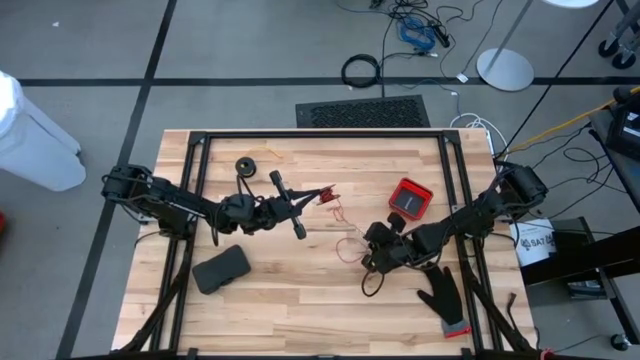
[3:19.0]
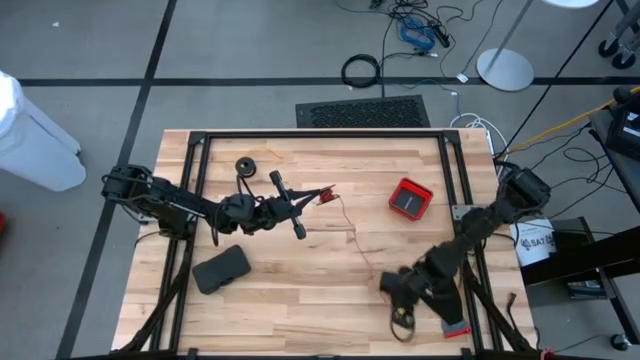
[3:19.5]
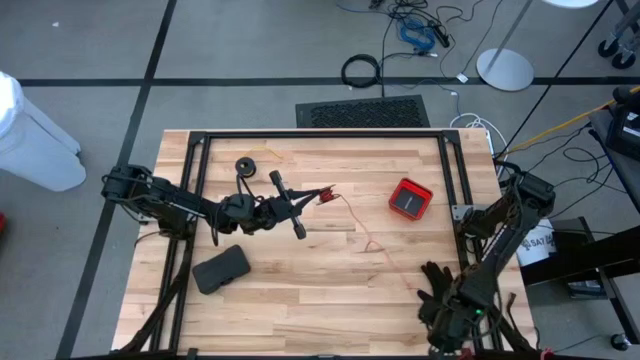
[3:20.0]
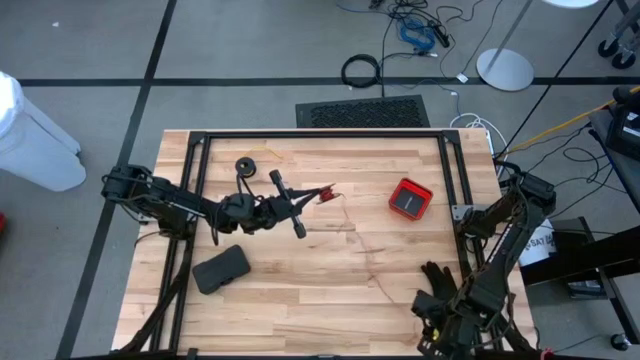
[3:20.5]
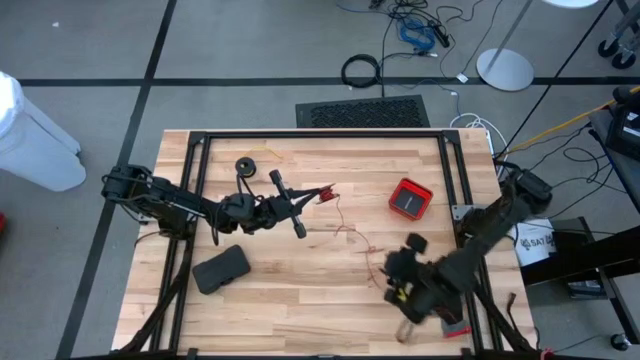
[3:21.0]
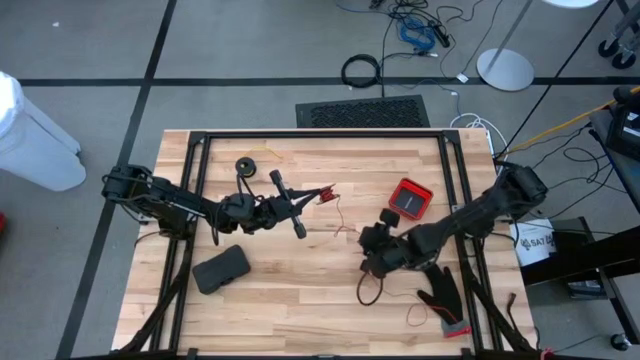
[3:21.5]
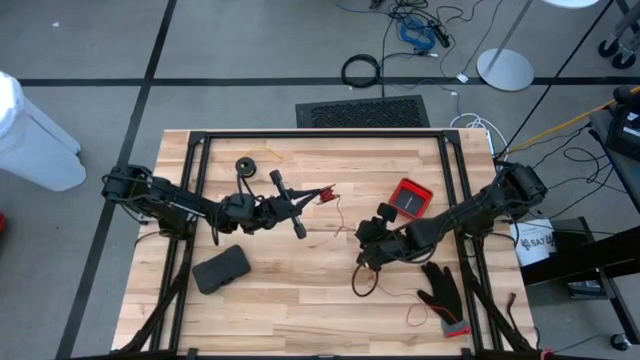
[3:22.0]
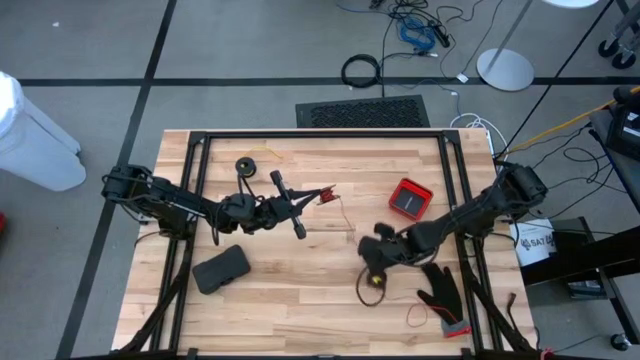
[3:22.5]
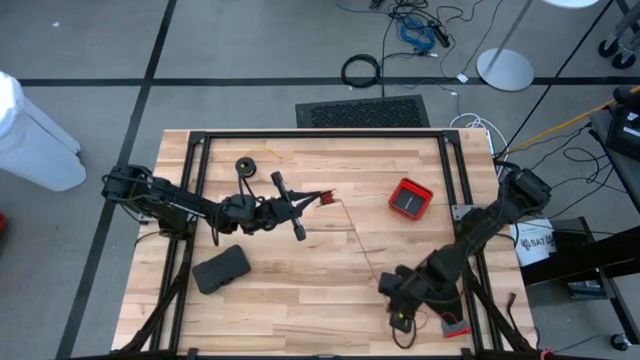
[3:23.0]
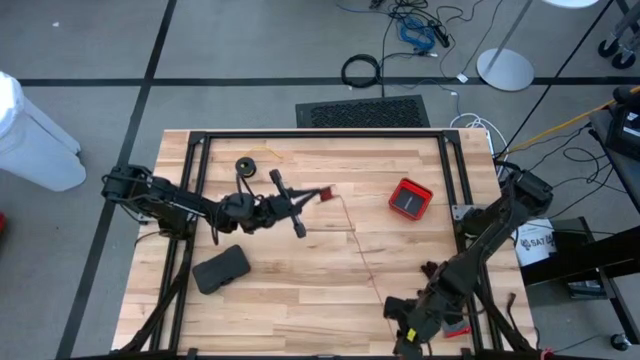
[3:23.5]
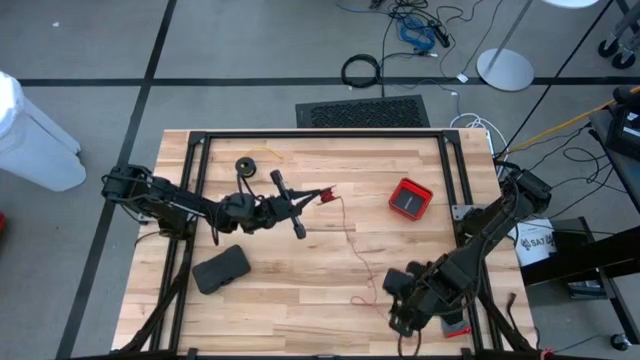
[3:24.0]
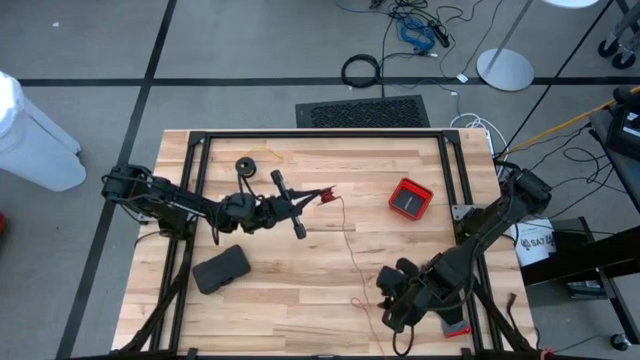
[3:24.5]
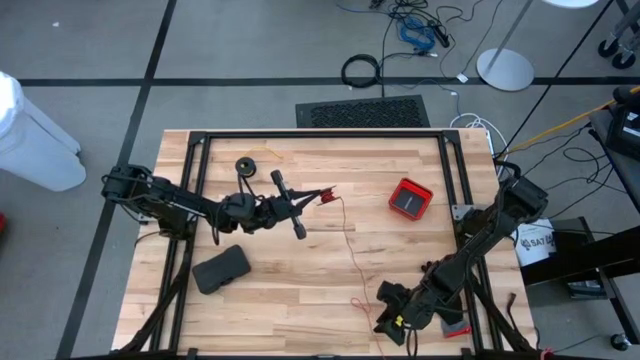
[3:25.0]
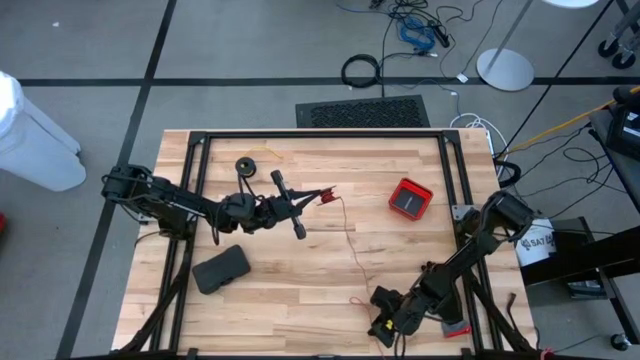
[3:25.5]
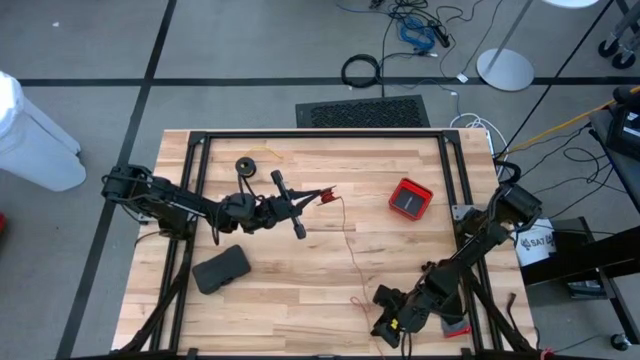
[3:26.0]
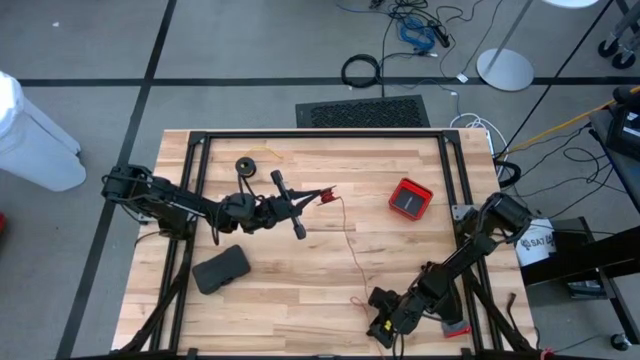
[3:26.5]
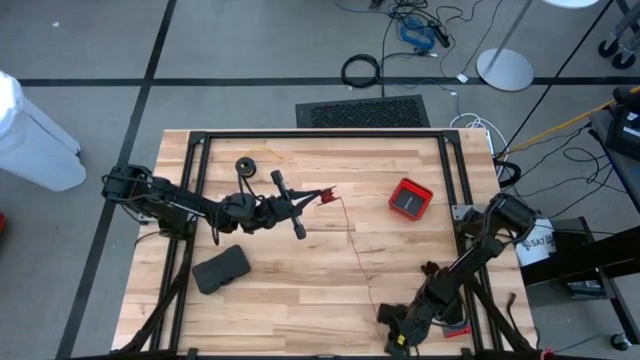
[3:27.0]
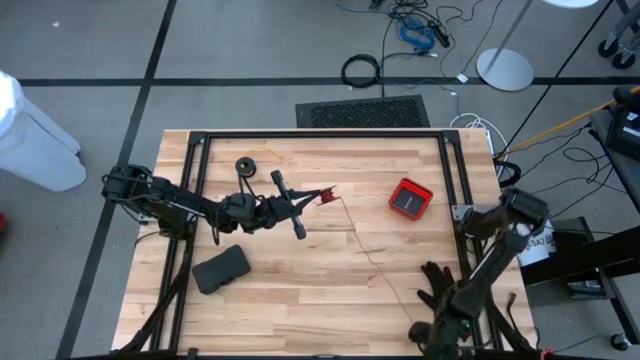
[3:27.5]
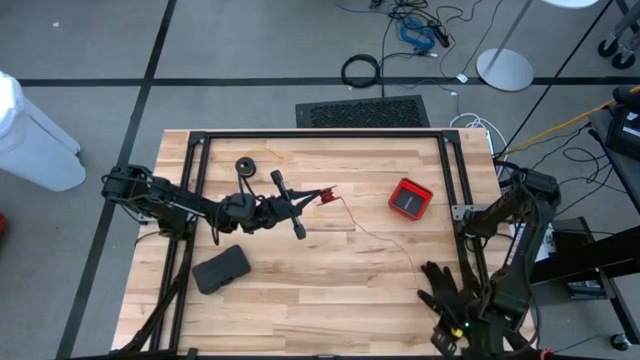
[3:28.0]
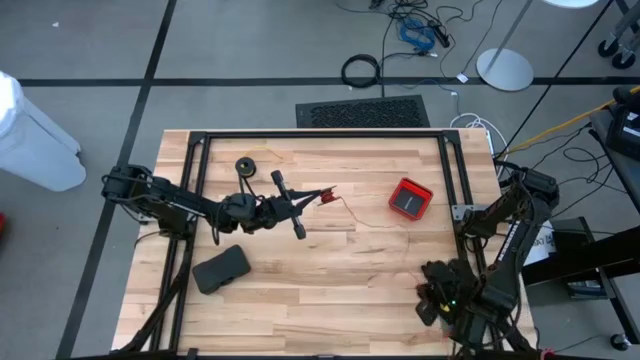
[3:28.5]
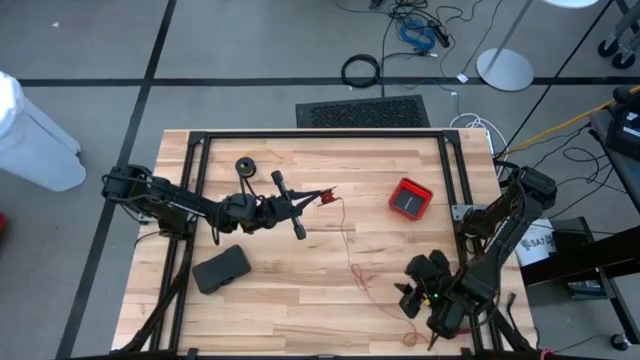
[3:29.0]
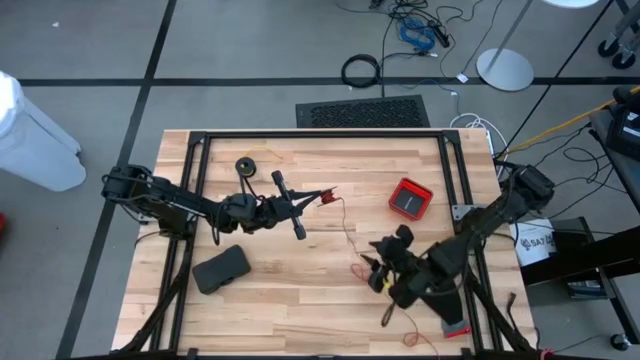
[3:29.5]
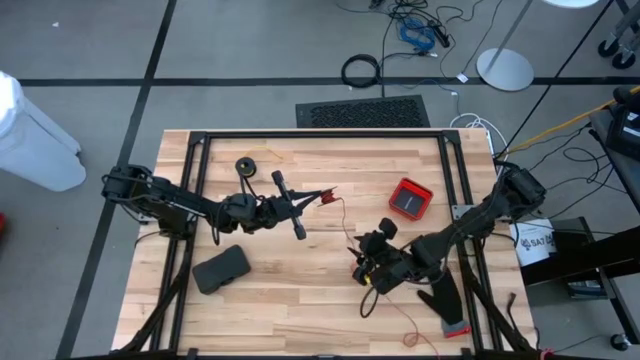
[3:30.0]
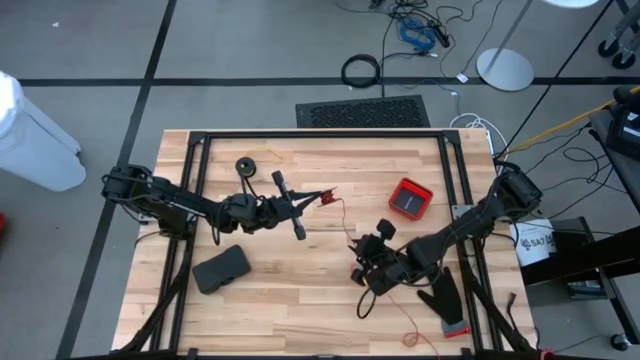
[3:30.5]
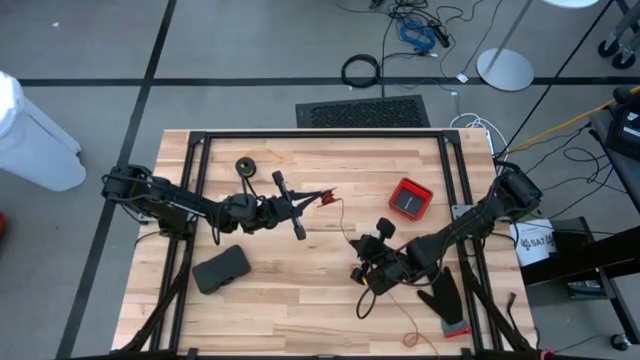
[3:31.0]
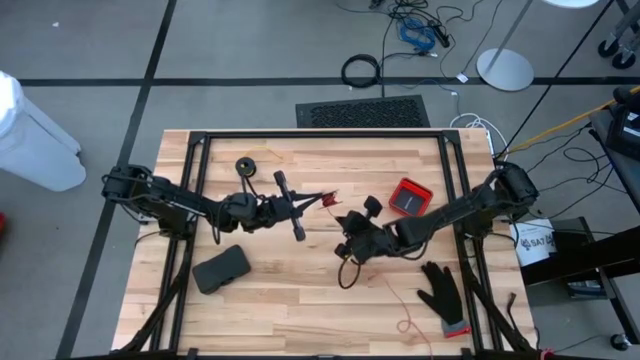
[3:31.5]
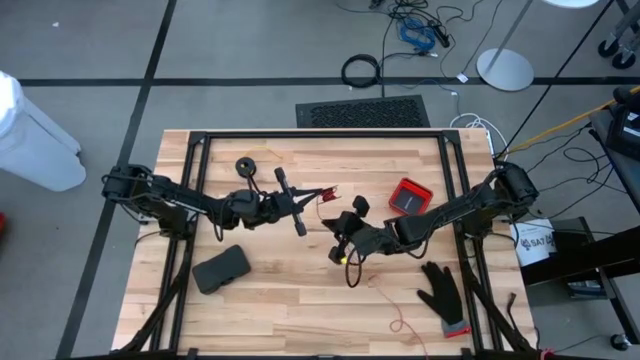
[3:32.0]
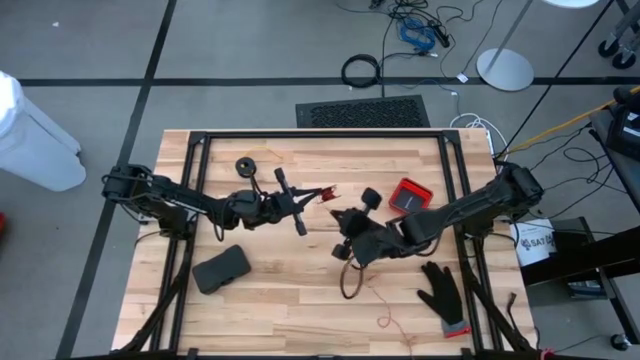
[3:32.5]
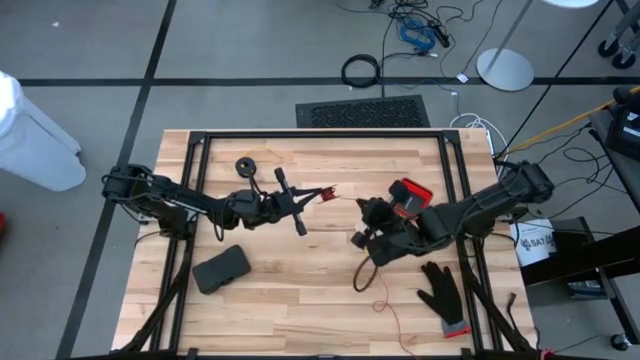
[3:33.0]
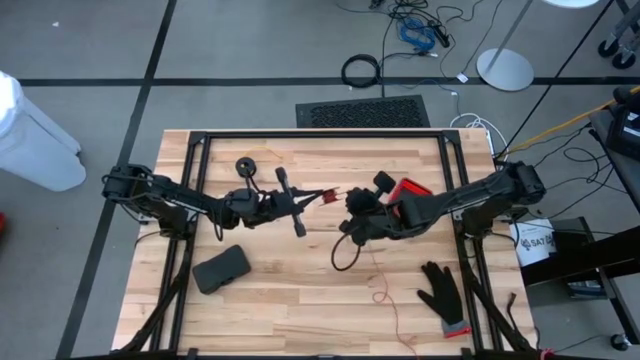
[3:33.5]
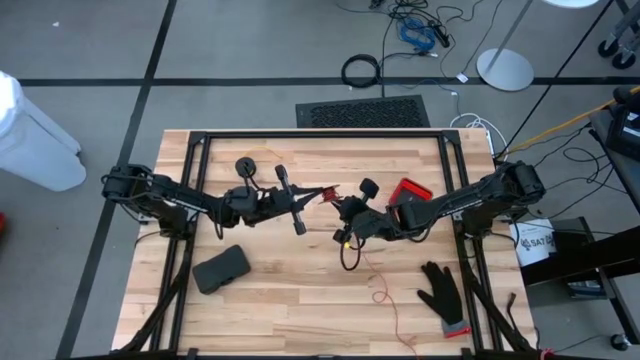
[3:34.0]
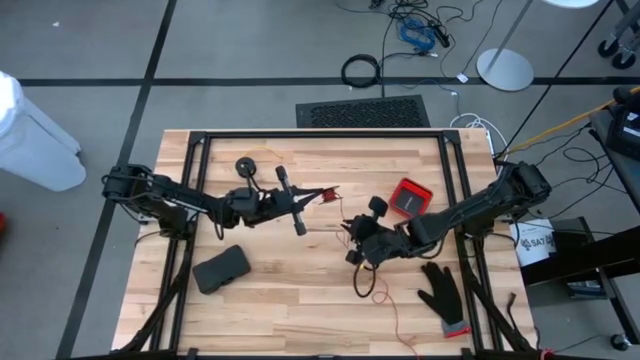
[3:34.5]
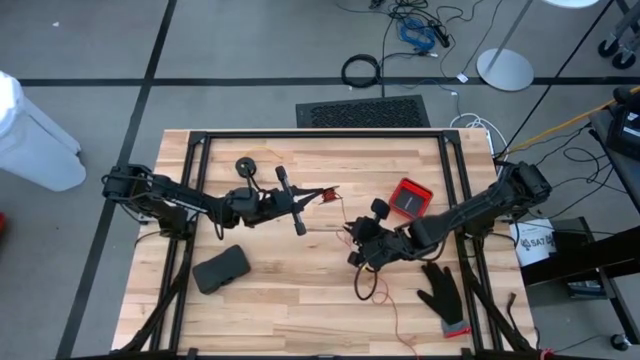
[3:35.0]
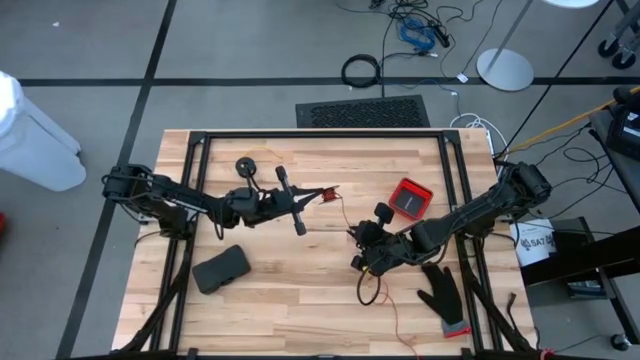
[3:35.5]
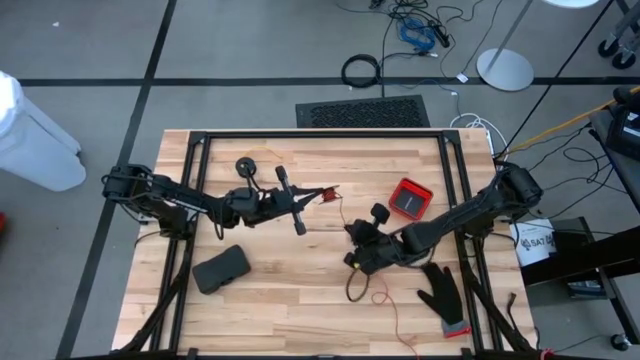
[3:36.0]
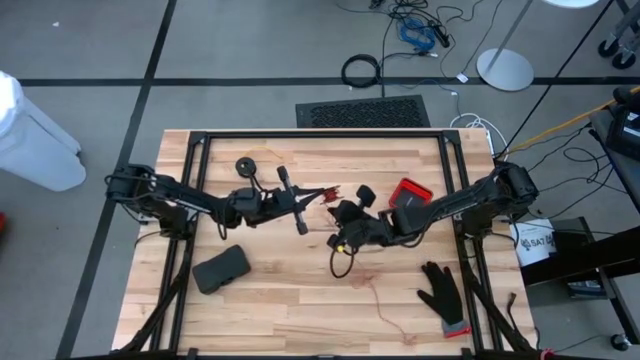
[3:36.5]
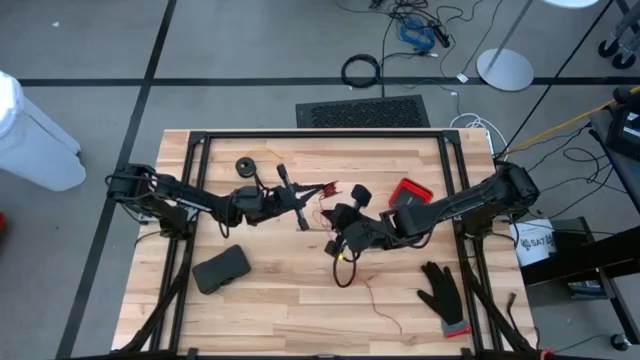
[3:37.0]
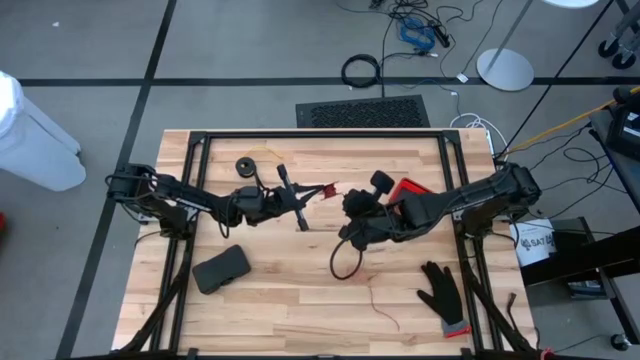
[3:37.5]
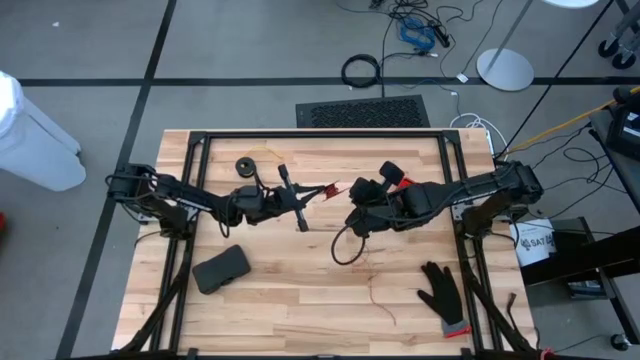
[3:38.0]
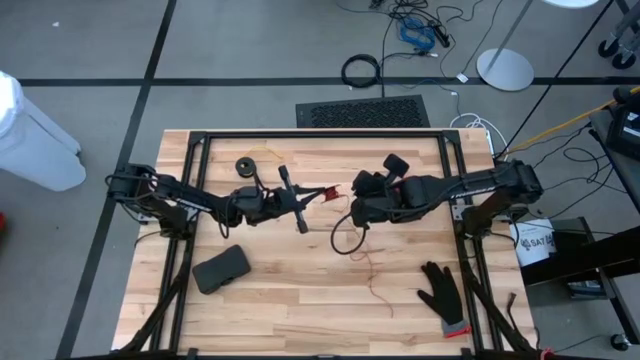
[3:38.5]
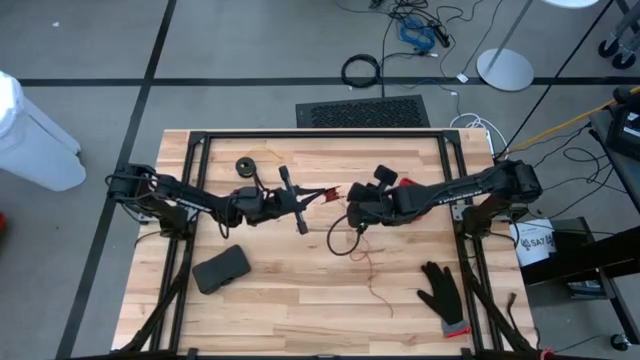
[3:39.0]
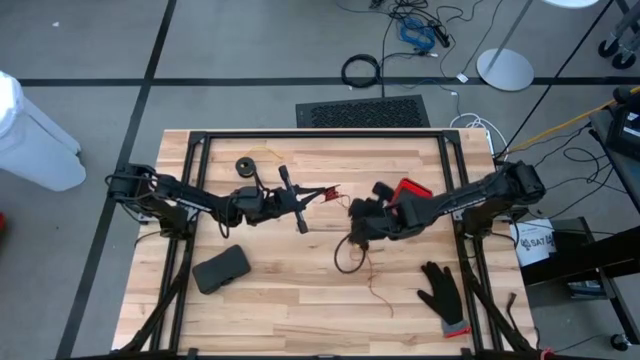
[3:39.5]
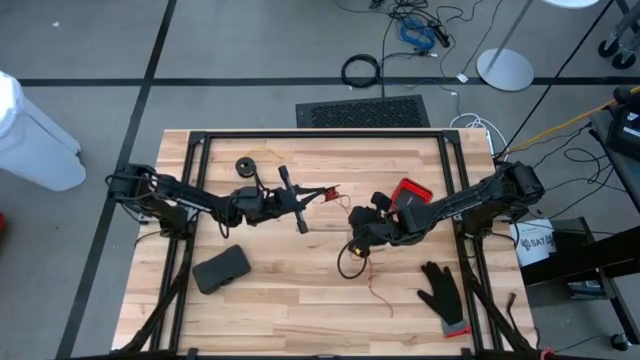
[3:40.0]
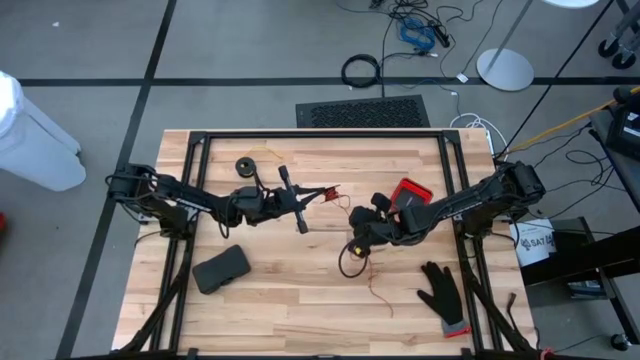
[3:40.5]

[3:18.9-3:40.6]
Task: Coil cords
Coil the red wire onto the black spool
